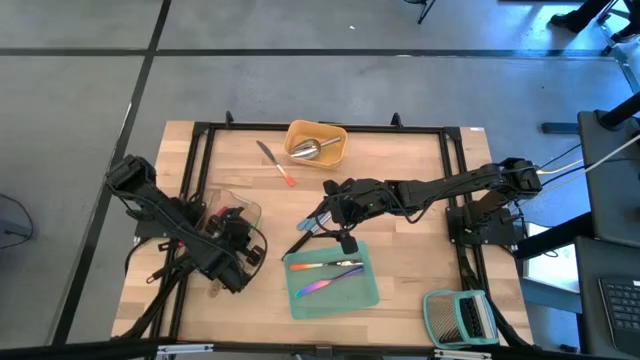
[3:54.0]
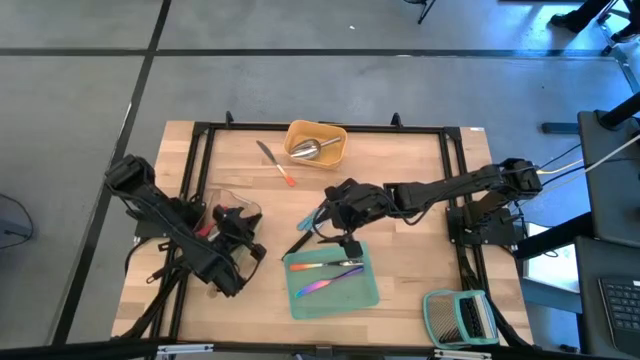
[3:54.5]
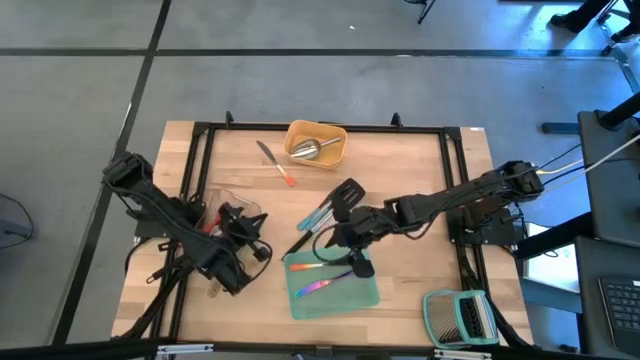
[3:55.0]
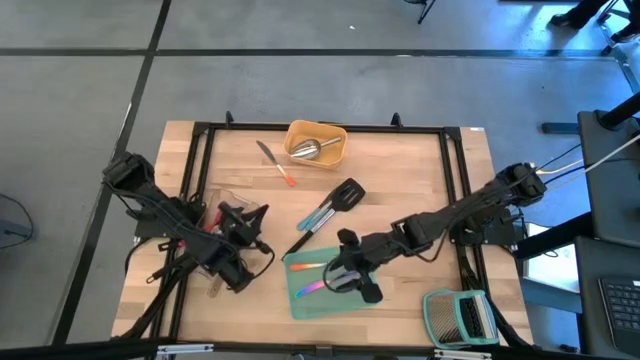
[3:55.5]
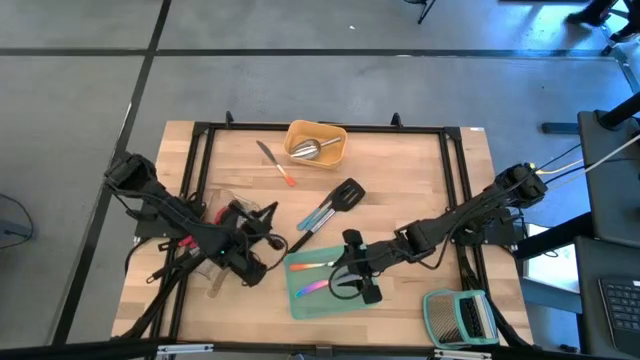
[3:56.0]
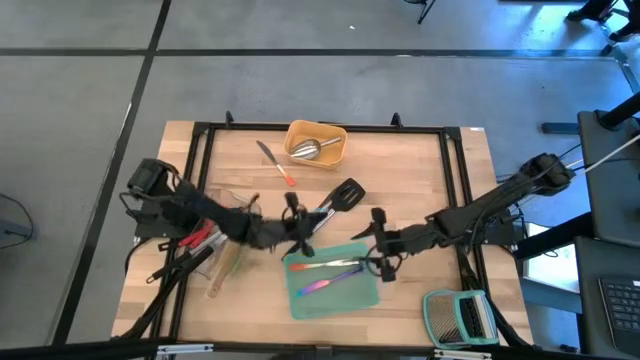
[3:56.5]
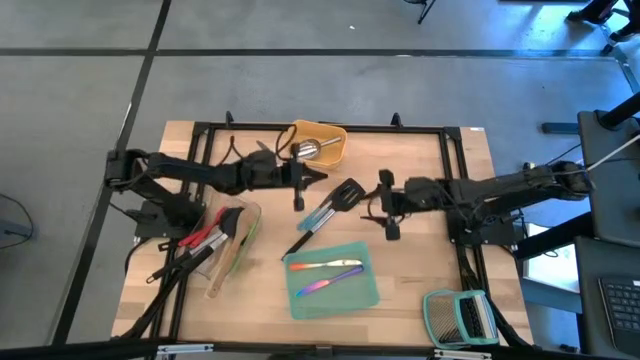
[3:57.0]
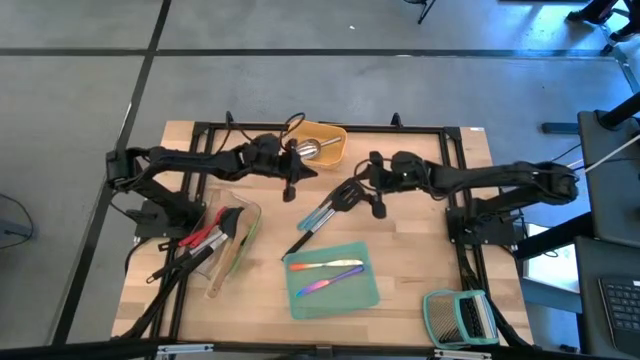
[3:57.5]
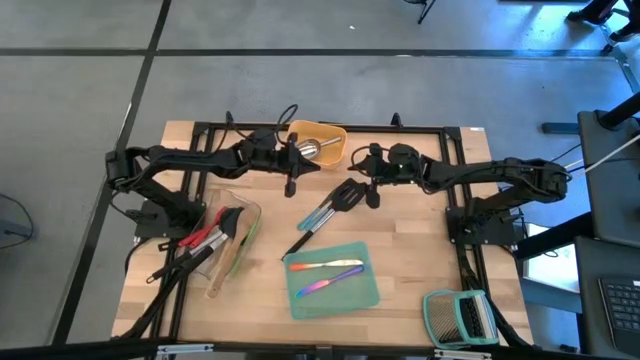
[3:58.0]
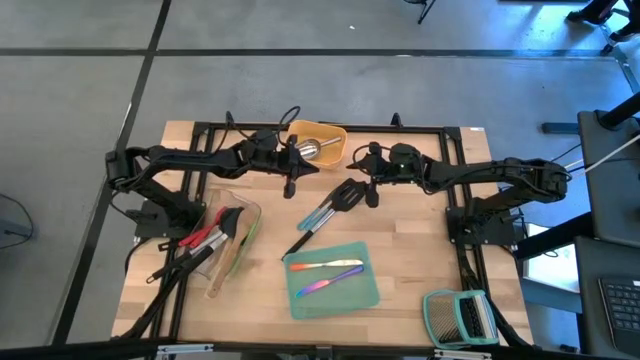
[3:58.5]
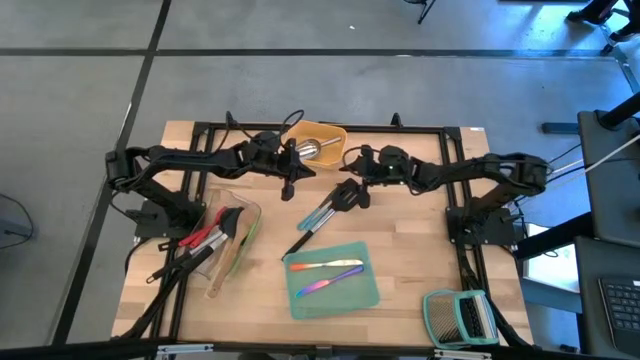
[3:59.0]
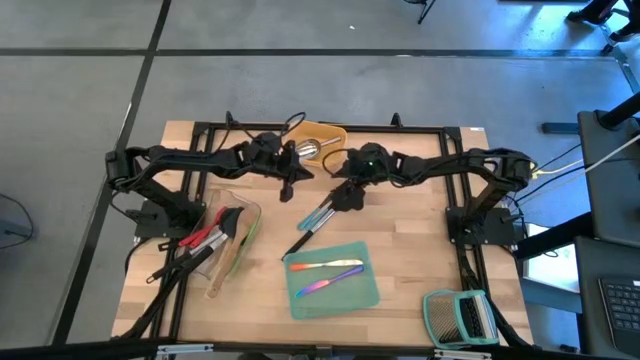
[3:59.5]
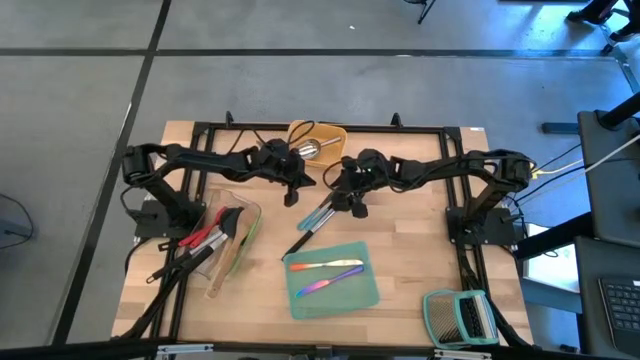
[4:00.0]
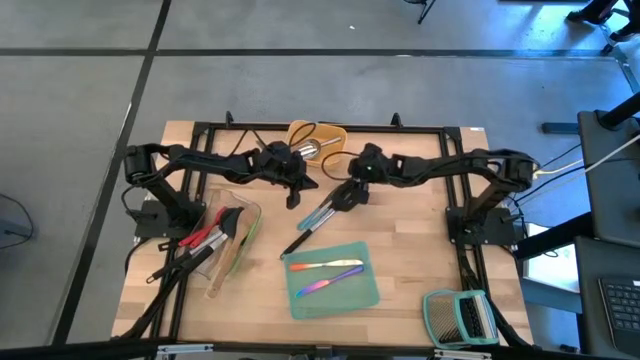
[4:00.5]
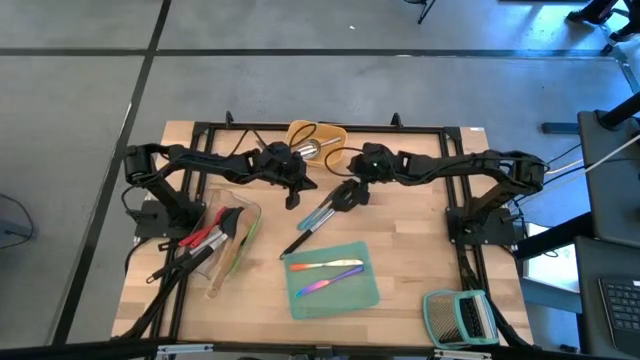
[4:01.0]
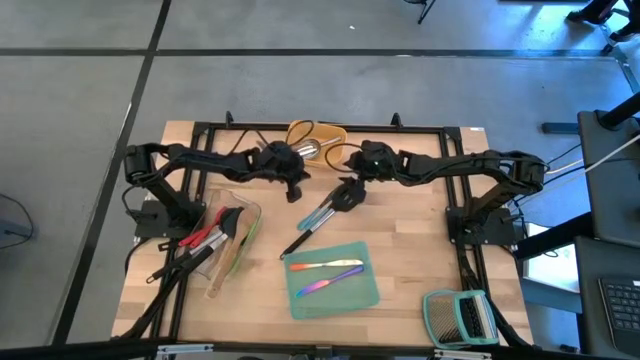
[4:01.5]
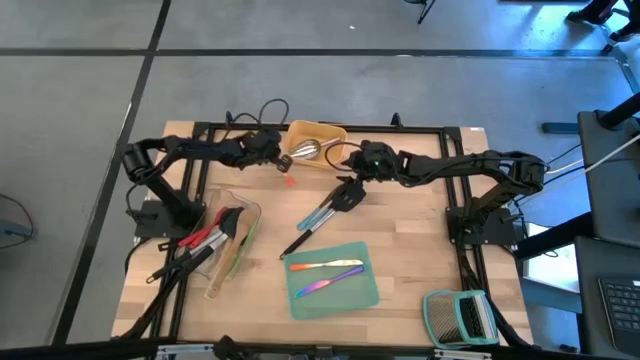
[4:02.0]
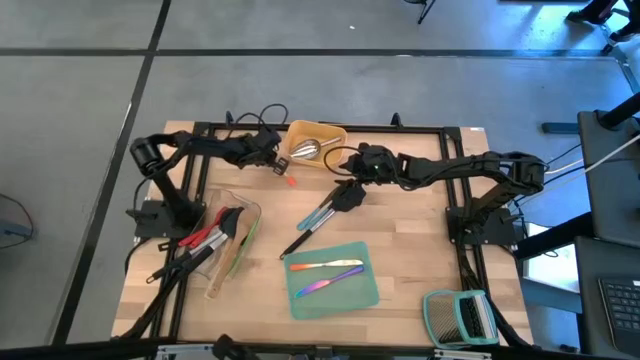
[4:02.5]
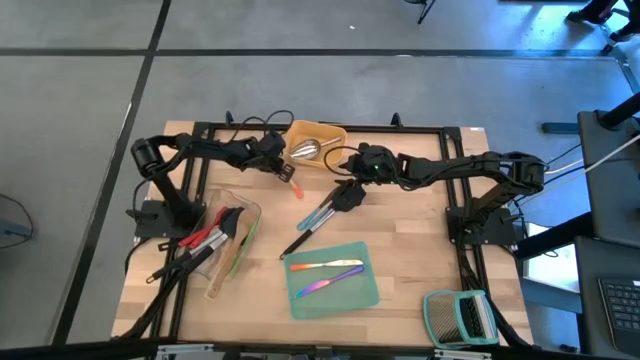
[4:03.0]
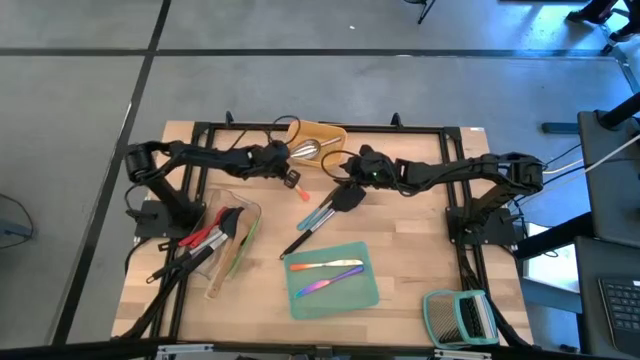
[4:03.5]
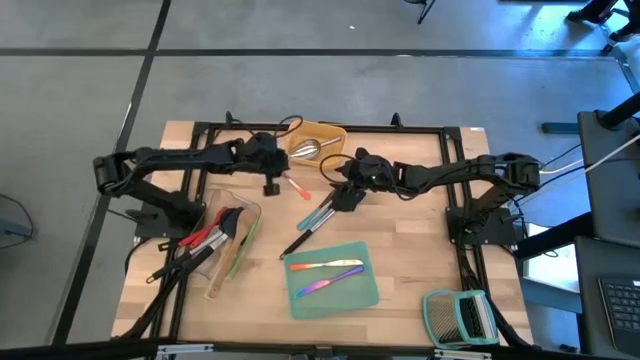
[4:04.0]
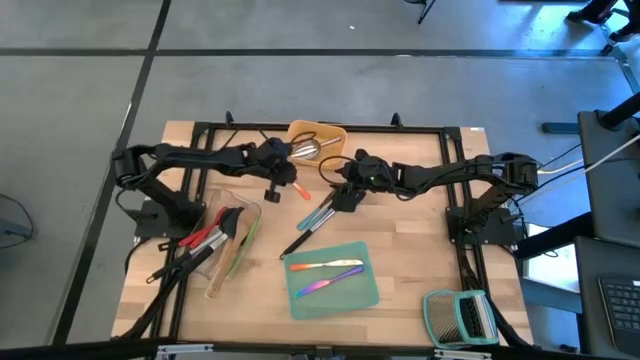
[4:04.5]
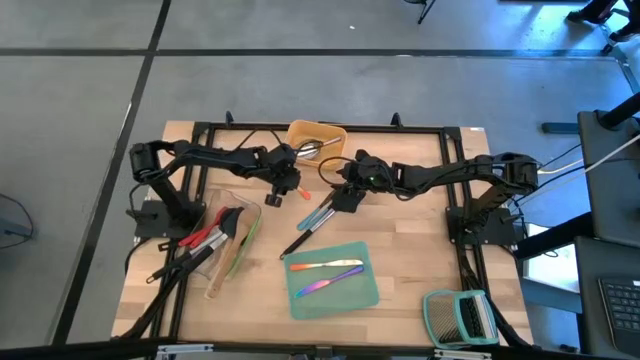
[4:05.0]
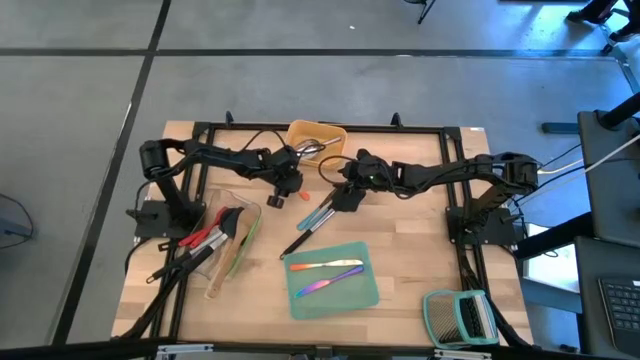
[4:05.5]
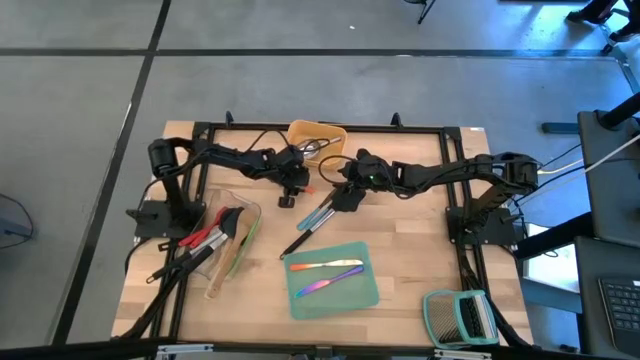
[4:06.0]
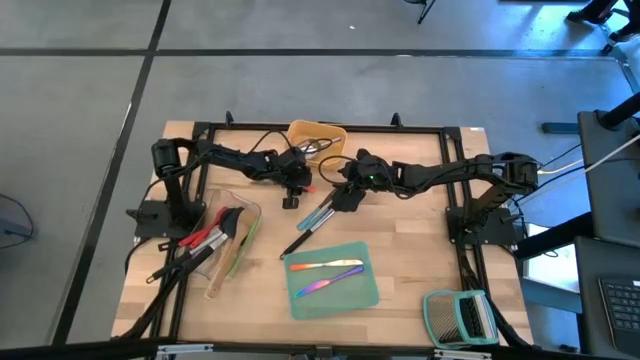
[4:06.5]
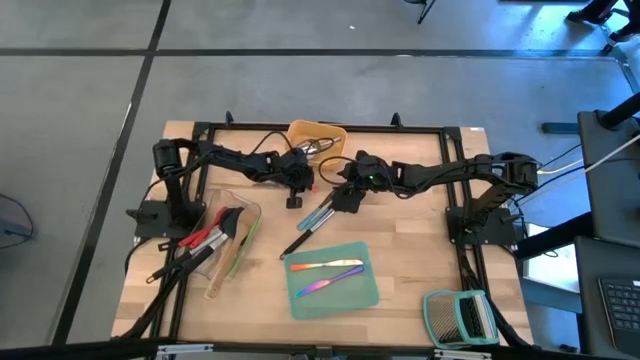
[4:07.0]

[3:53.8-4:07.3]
Task: Pick & Place Kitchen Items
Put the orange table knife into the green bin

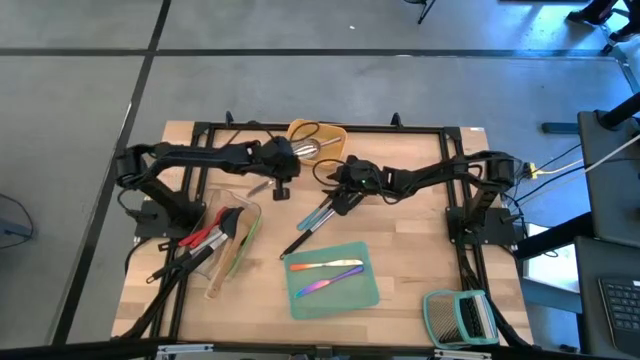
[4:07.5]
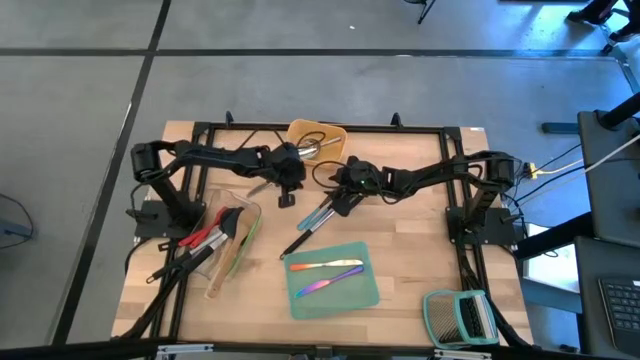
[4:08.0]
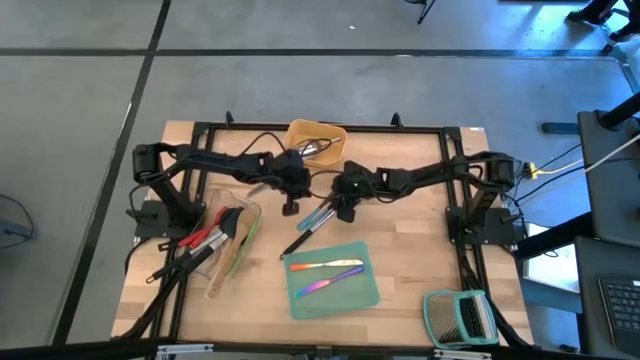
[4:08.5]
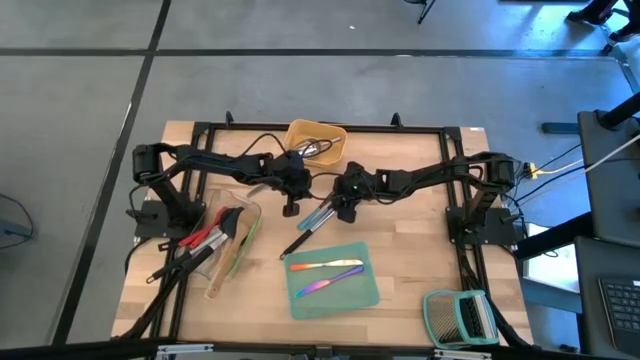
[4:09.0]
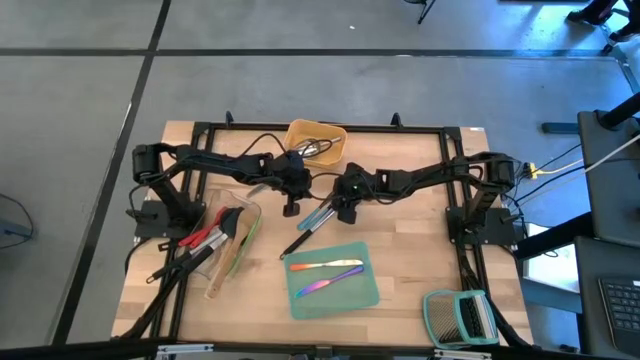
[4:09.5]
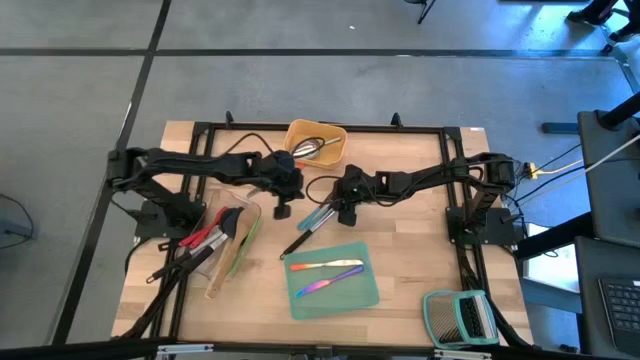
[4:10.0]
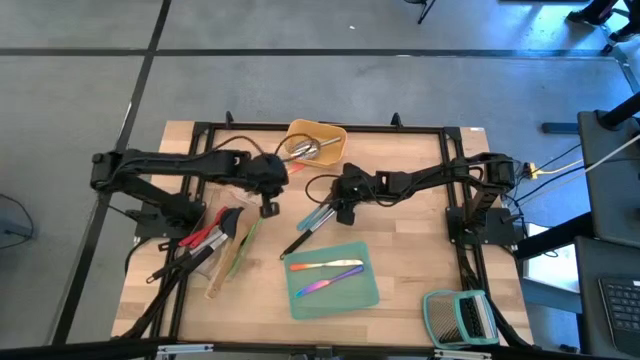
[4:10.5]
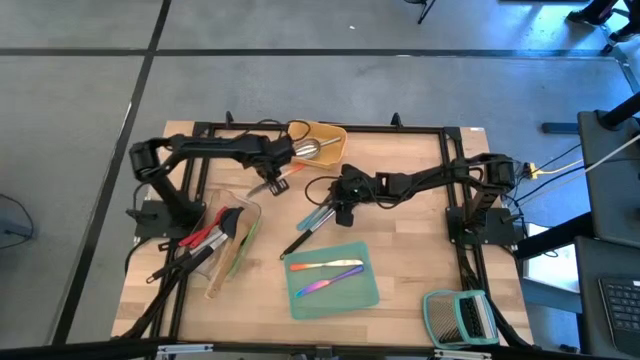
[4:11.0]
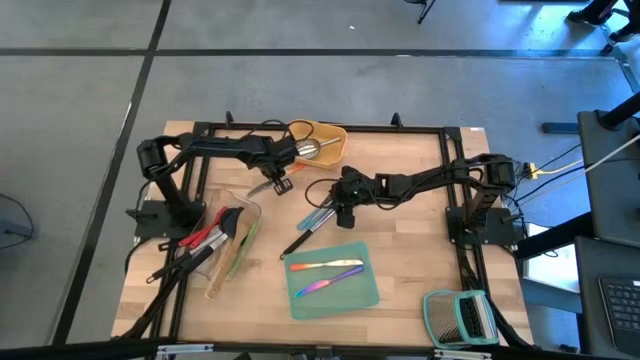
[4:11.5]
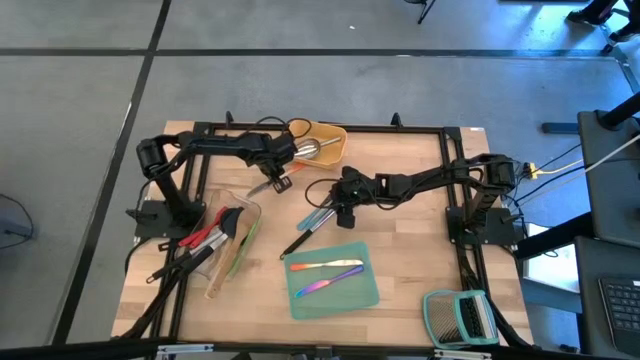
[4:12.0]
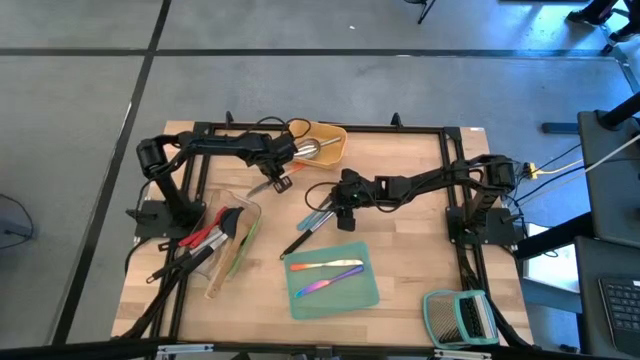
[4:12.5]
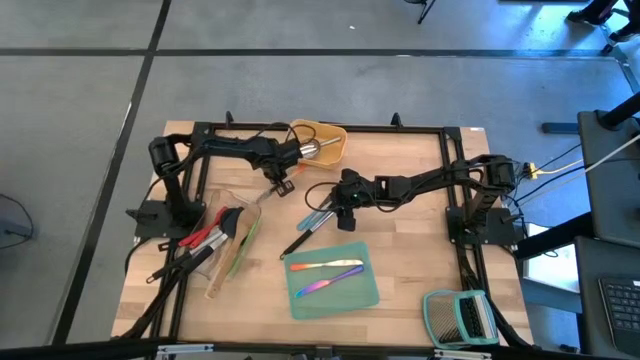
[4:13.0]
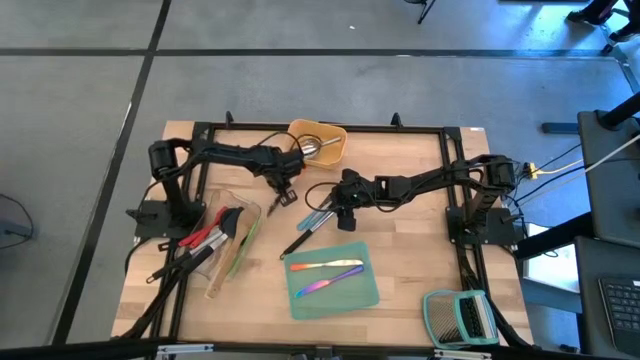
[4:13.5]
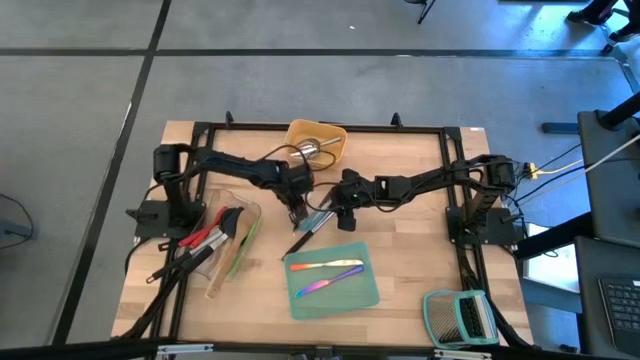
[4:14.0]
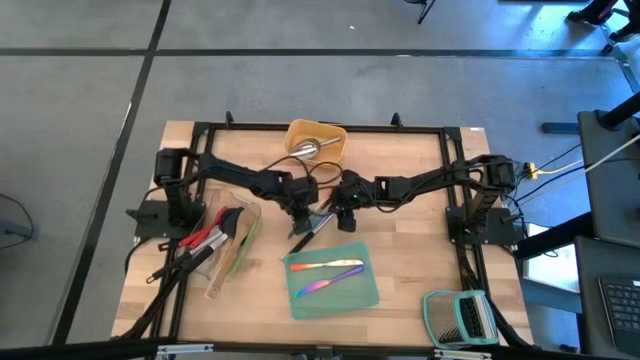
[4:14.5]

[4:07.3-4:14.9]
Adjust the orange table knife on the table

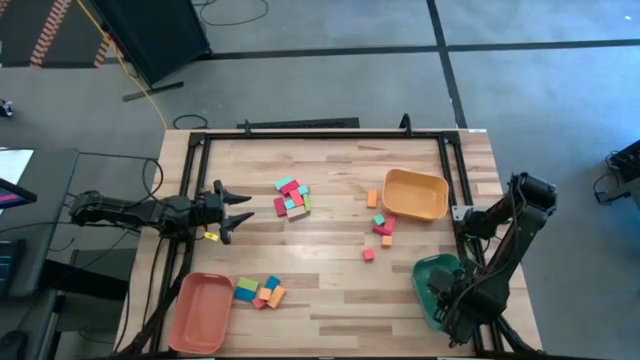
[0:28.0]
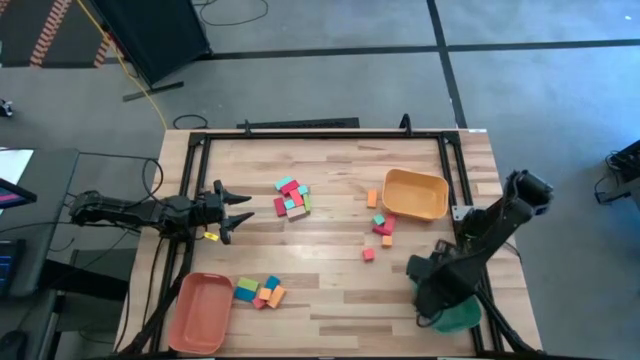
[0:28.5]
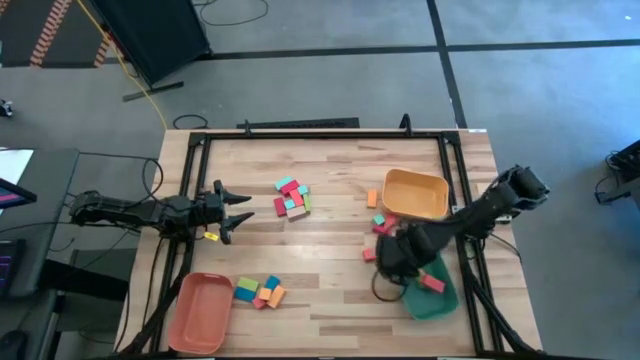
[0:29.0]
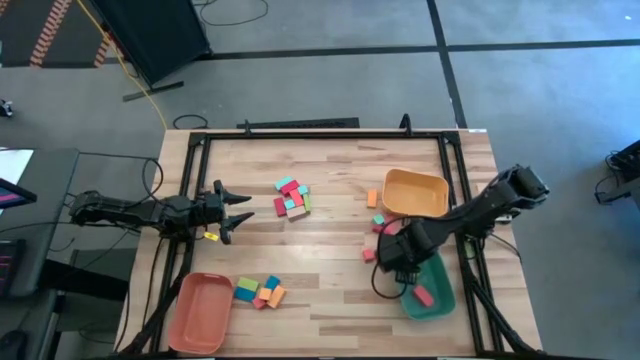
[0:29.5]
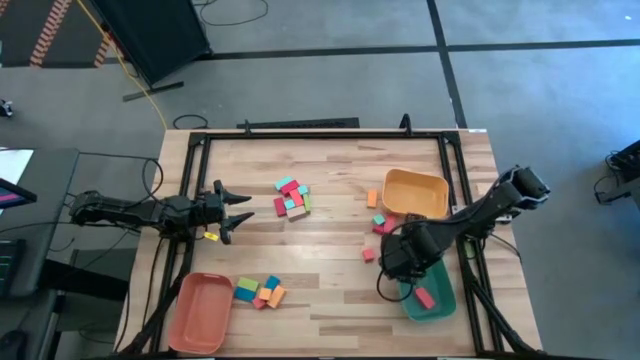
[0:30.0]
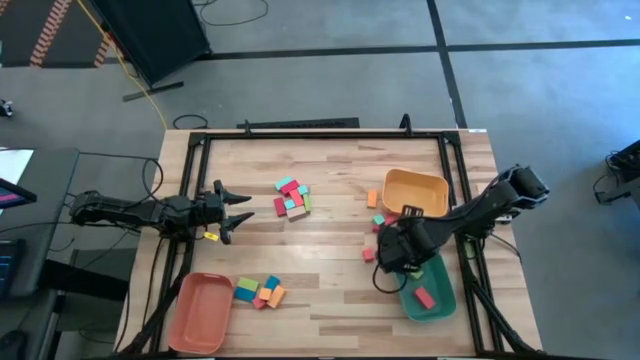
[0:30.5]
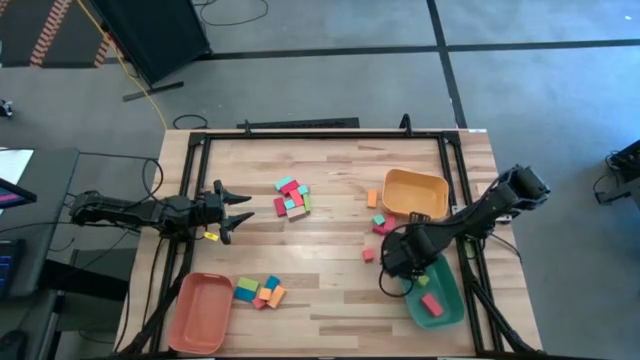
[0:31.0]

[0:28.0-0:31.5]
Task: Sort blocks by size
Adjust the green bin
